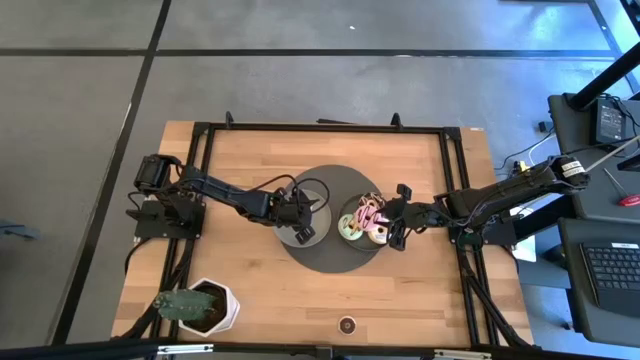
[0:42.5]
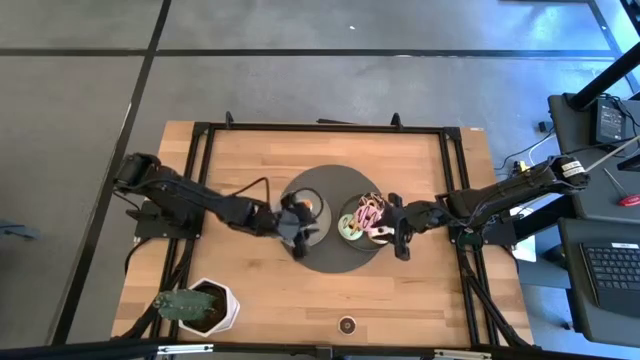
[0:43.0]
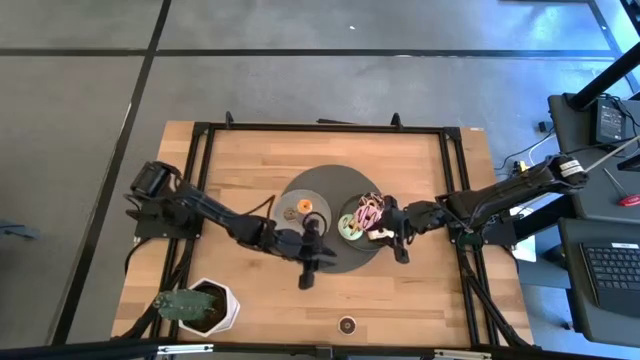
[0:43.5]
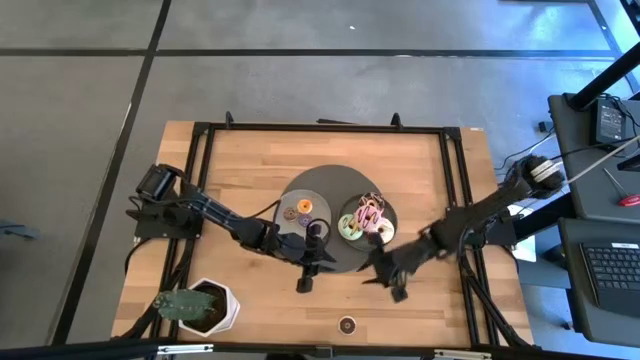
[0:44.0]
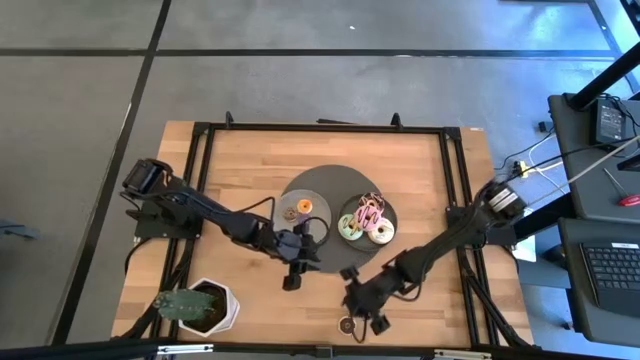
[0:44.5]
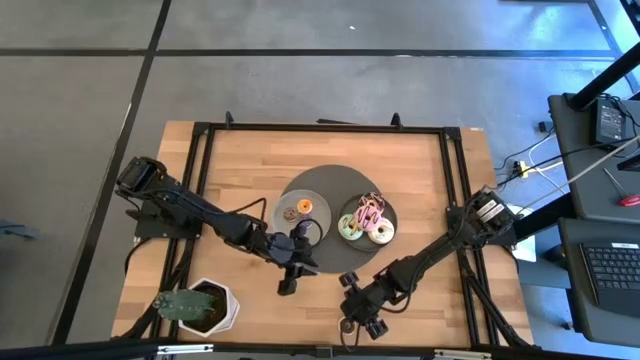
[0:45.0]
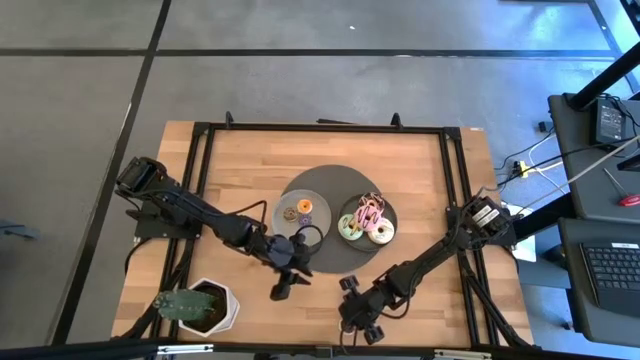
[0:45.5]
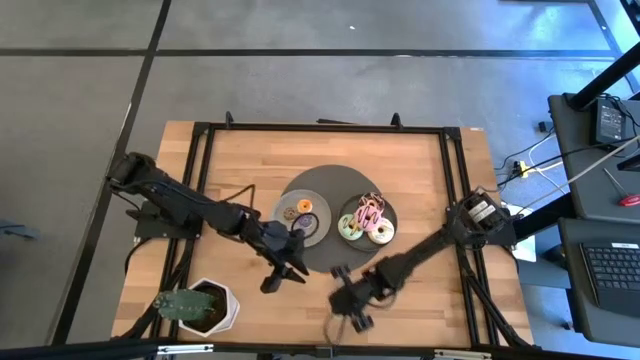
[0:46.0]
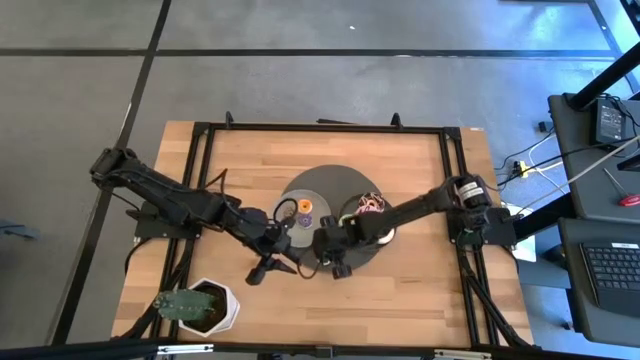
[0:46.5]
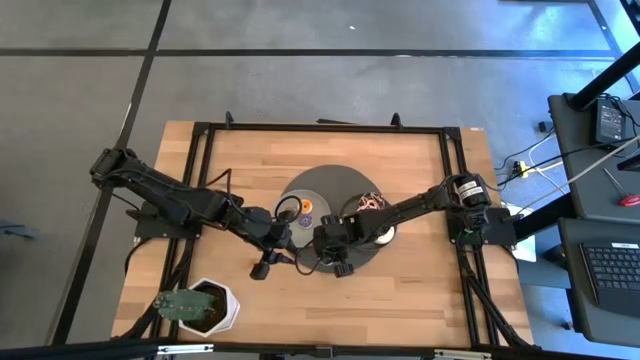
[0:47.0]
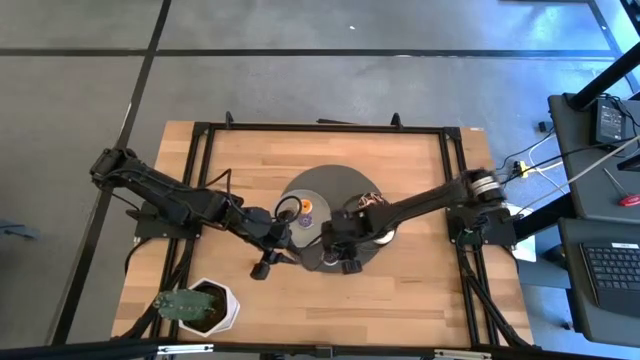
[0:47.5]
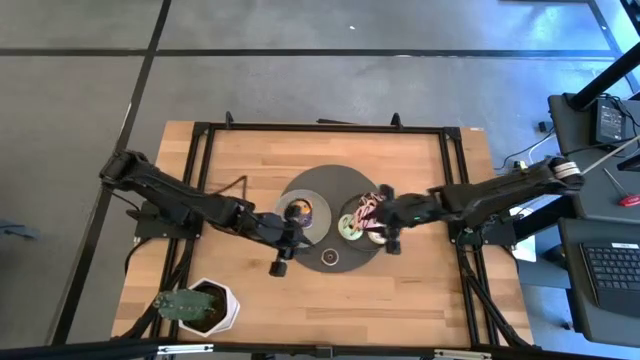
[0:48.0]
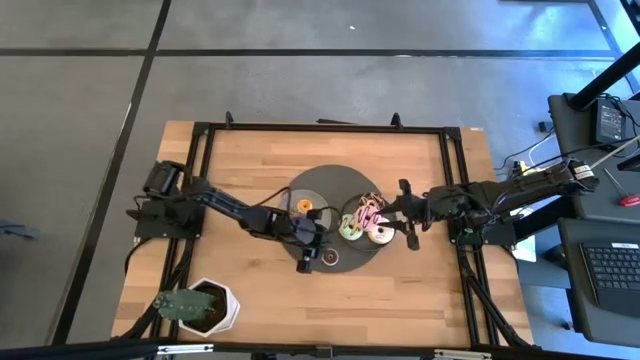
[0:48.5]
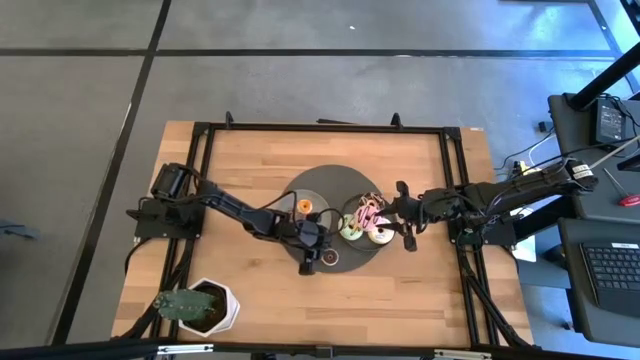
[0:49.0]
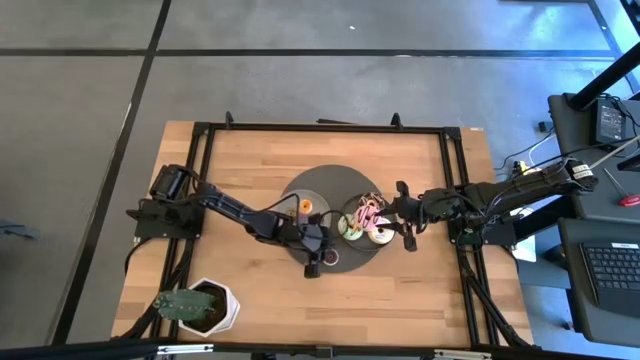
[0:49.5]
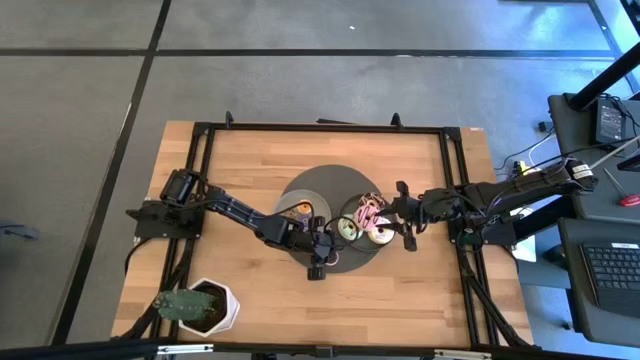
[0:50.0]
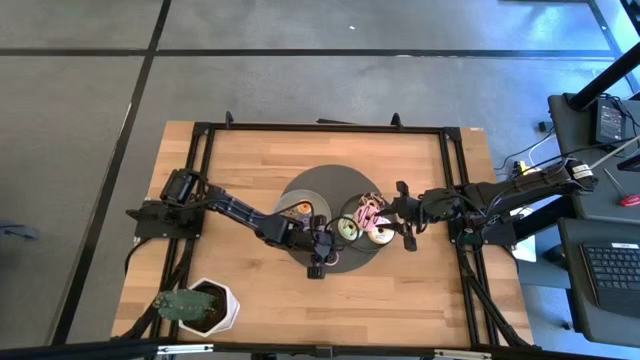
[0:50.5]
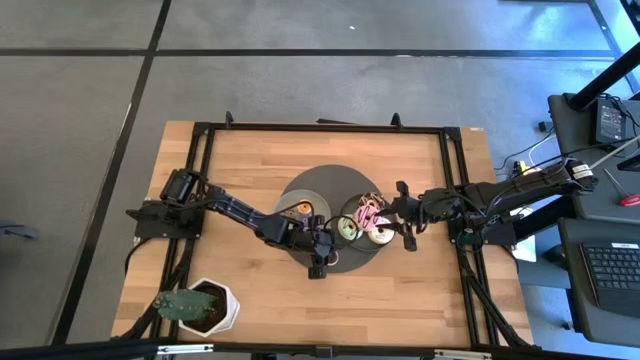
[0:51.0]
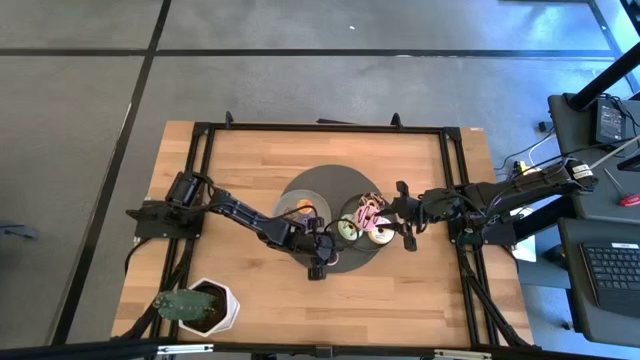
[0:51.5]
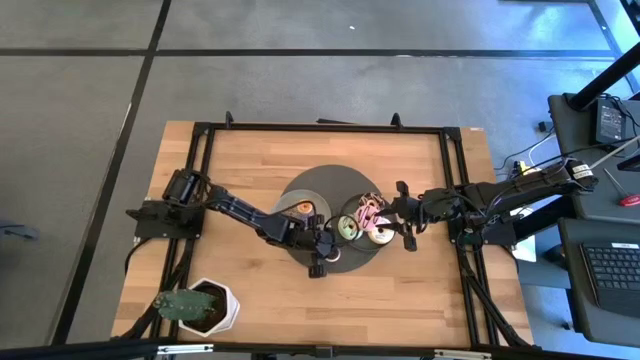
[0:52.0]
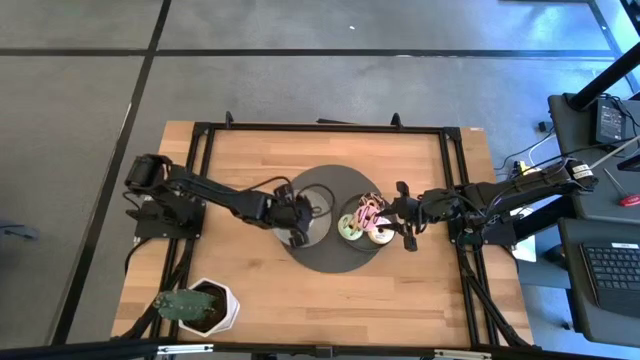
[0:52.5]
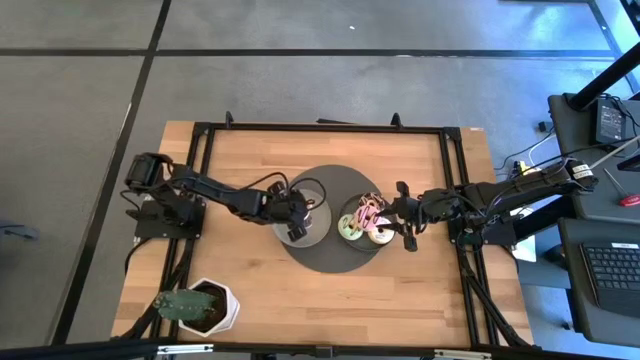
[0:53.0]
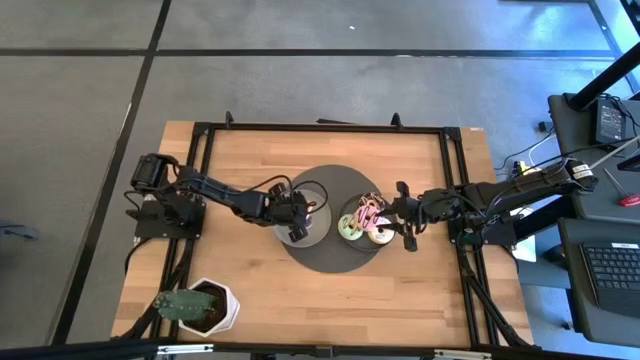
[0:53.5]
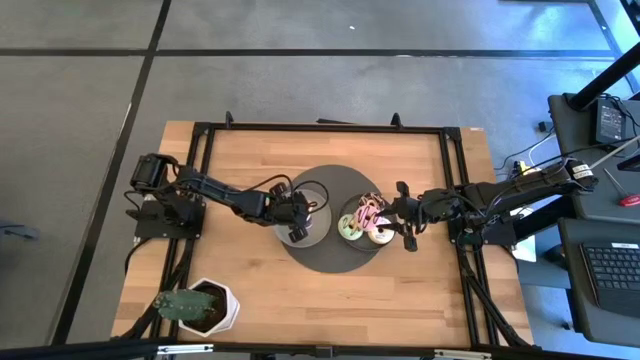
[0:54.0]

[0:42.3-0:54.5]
Task: Pick & Place donuts
Put the small black donut on the gray plate

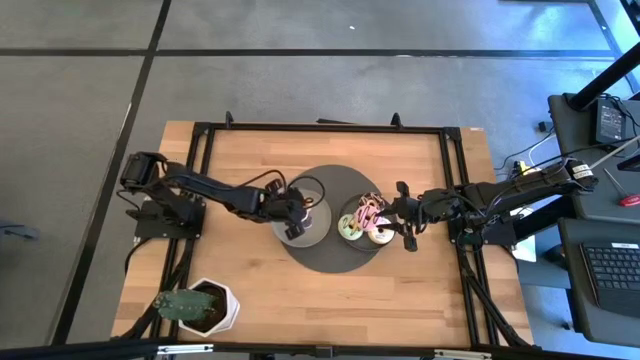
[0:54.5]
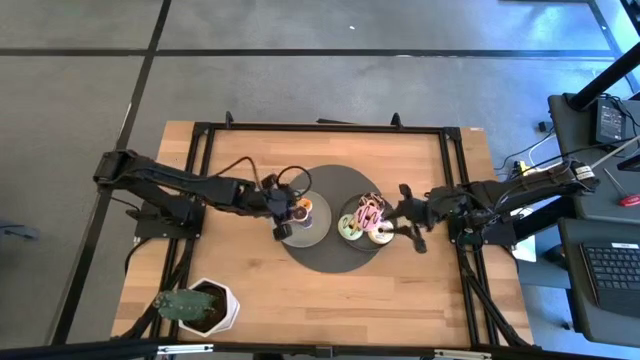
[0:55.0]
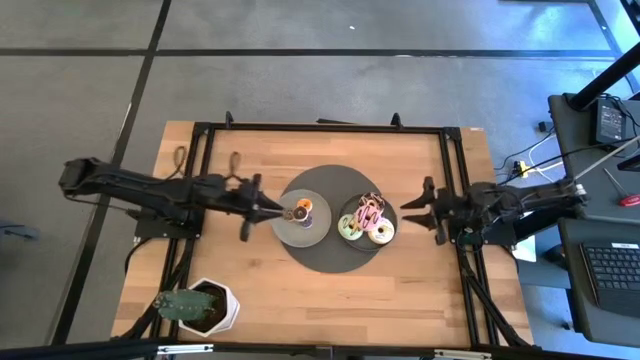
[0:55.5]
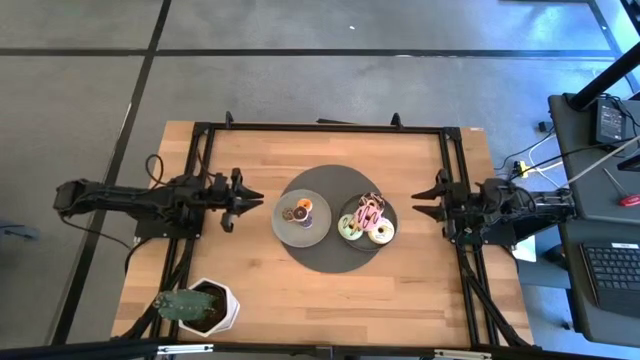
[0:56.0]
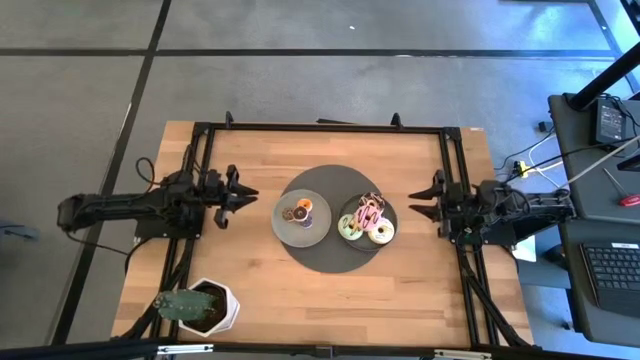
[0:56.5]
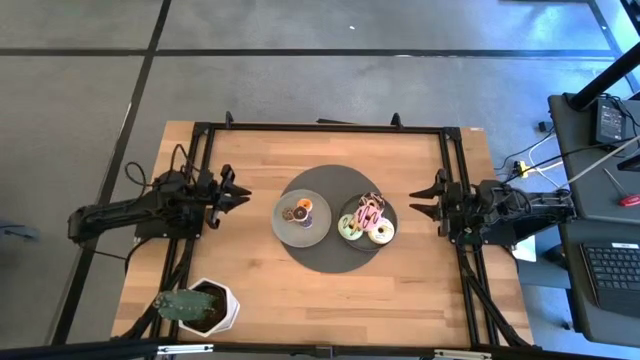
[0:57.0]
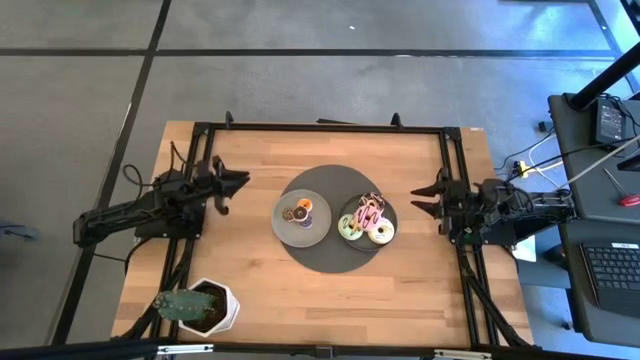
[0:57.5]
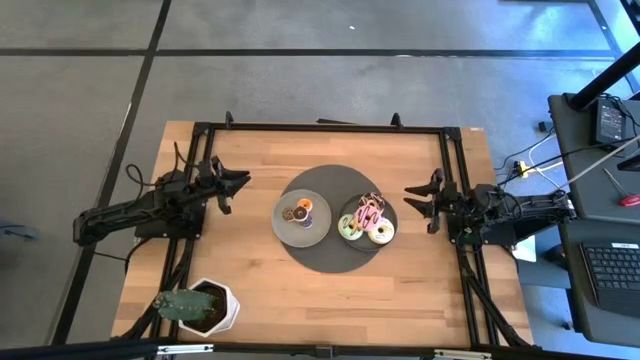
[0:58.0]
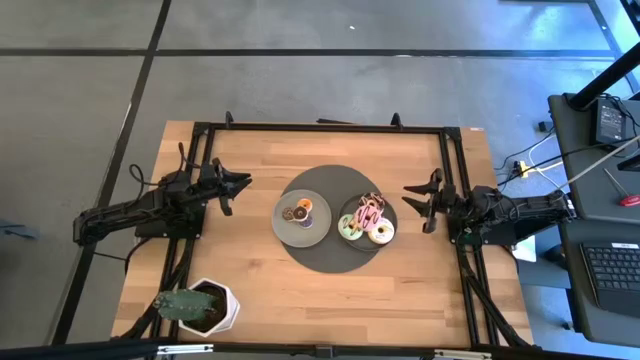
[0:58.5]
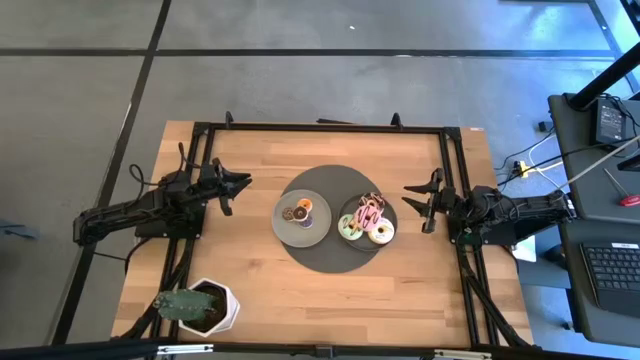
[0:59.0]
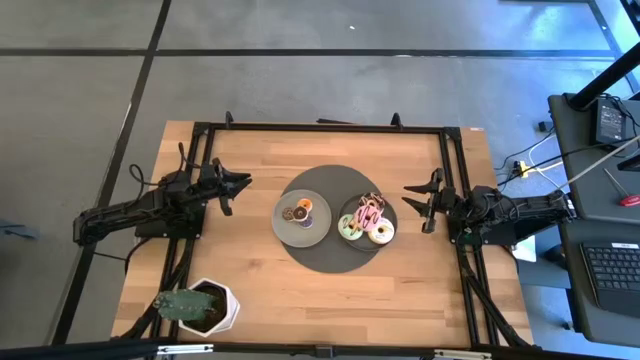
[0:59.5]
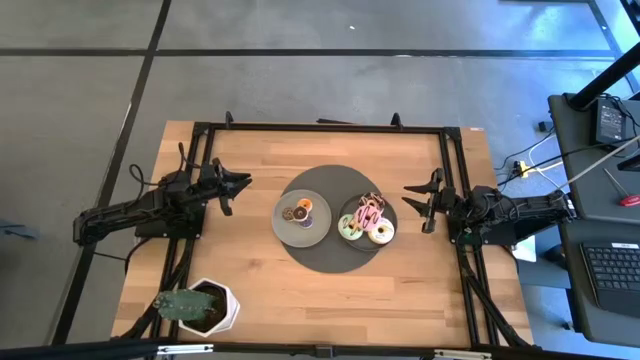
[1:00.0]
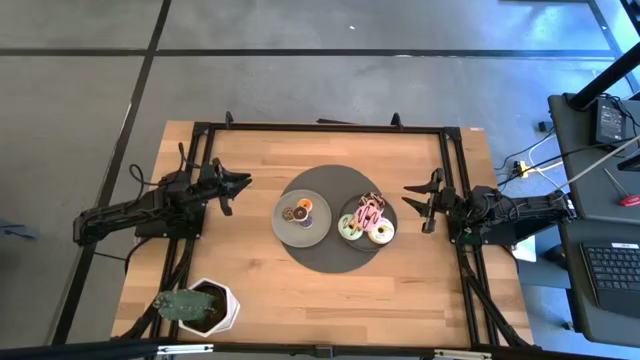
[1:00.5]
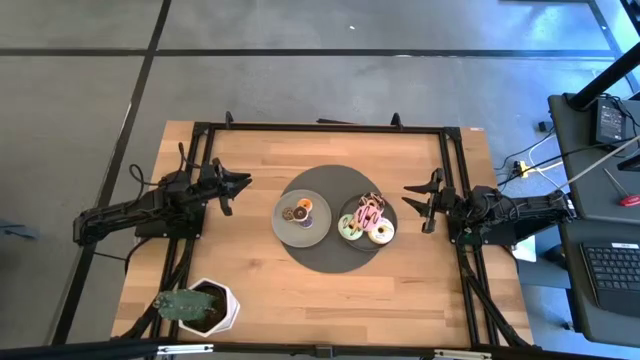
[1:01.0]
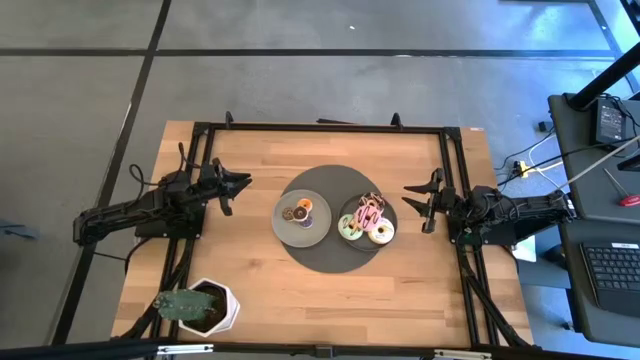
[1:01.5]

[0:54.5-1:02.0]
Return to Home Position

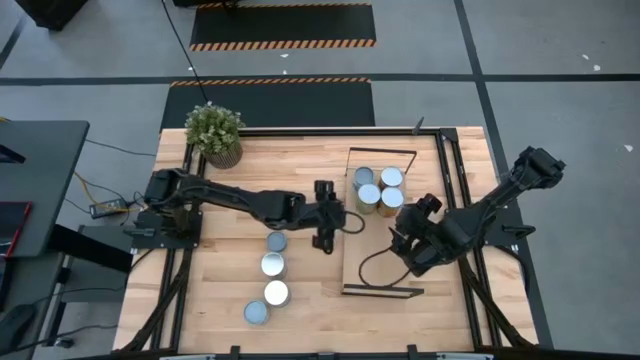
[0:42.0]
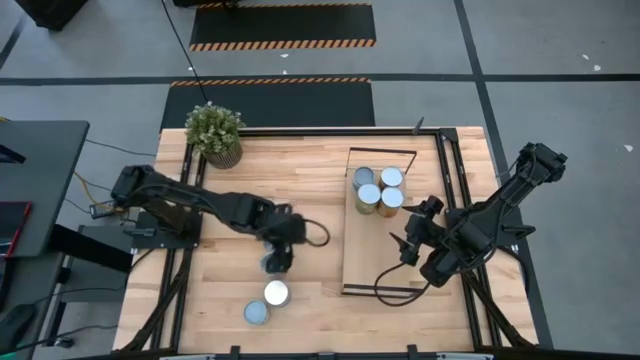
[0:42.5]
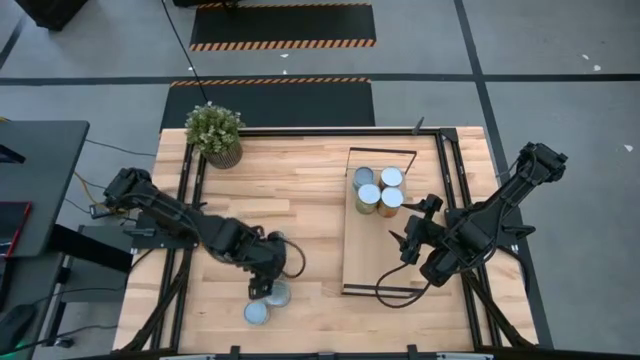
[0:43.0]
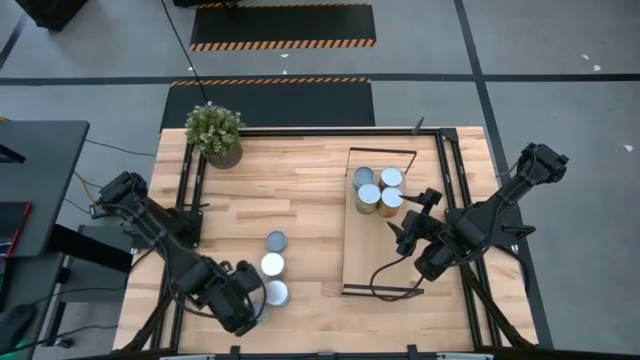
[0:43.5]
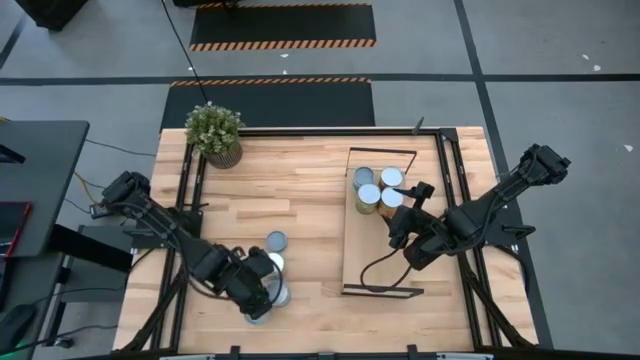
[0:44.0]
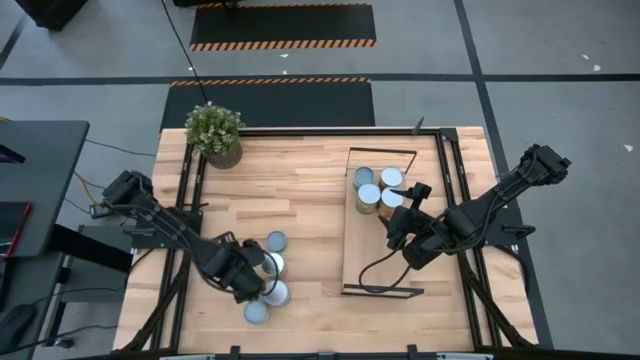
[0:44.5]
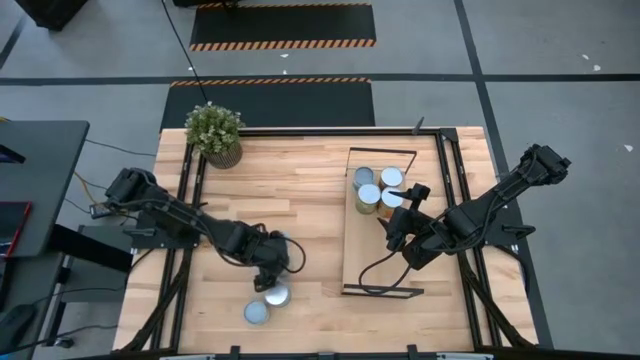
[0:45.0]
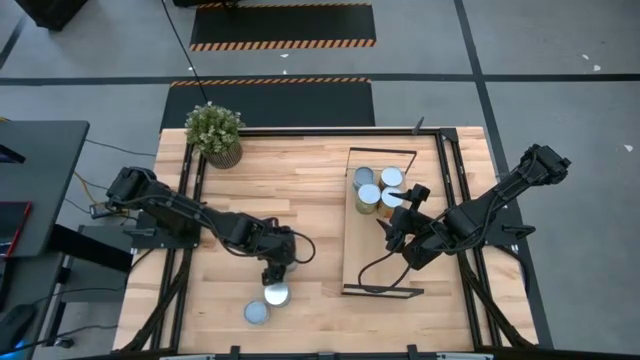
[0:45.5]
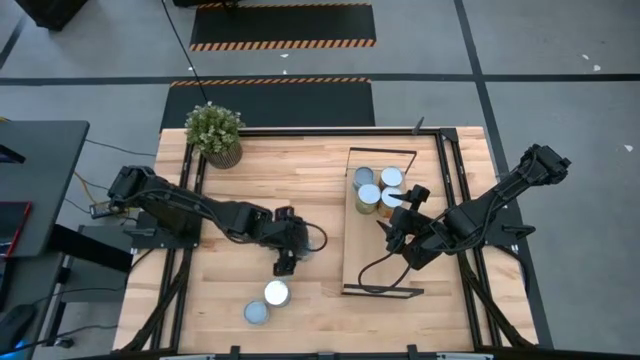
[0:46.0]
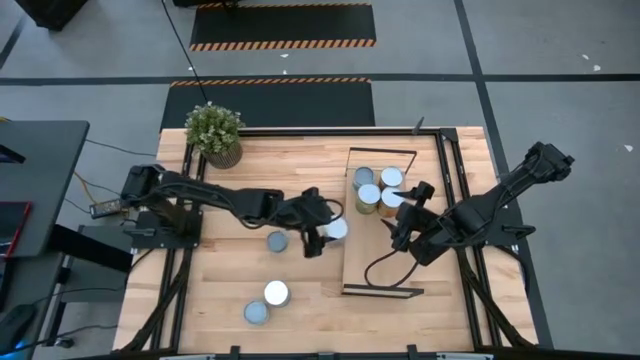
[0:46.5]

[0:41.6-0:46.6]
Task: Pick and place cans onto a shelf
Put the canned peaches on the shelf
